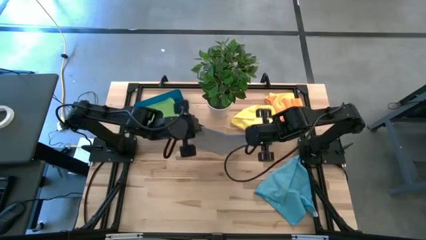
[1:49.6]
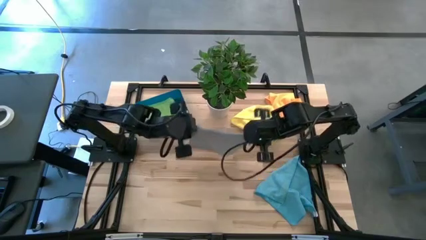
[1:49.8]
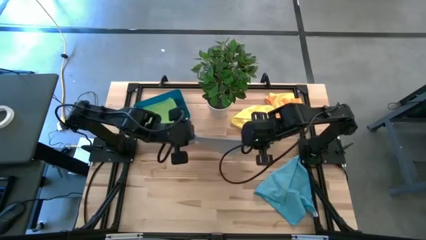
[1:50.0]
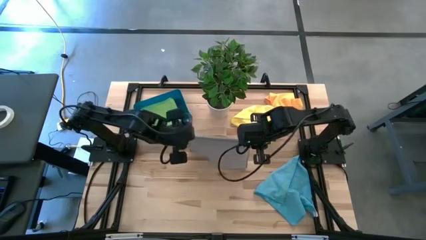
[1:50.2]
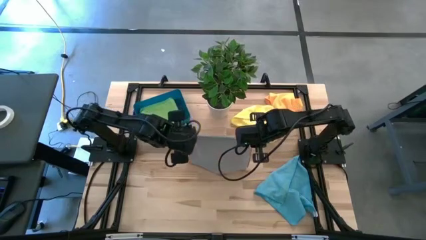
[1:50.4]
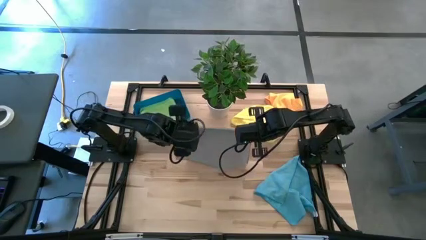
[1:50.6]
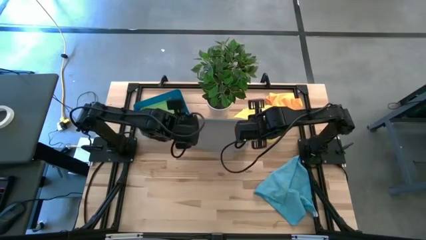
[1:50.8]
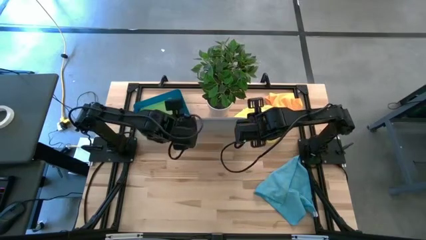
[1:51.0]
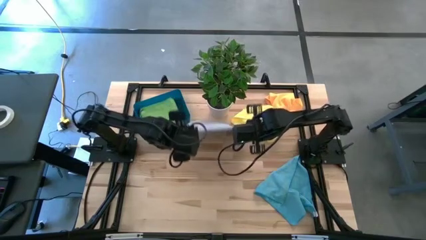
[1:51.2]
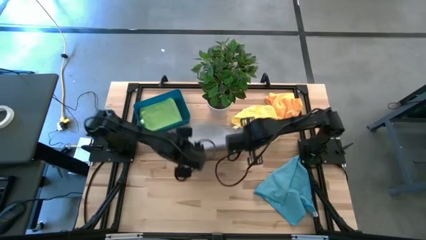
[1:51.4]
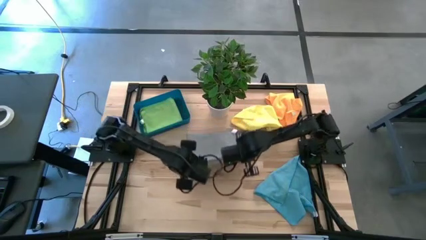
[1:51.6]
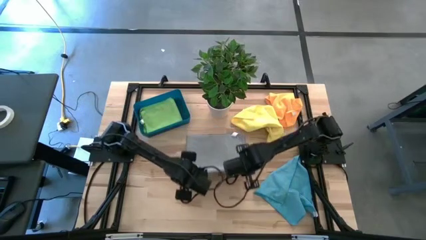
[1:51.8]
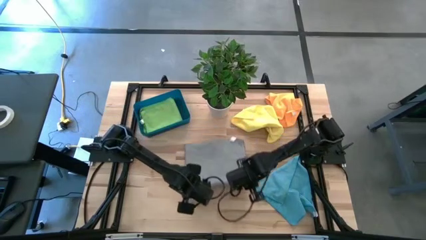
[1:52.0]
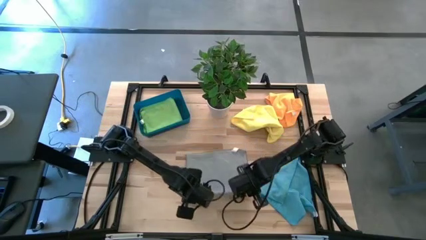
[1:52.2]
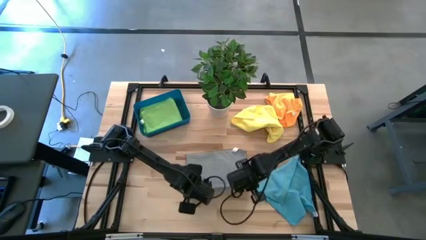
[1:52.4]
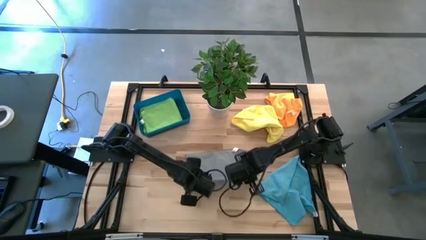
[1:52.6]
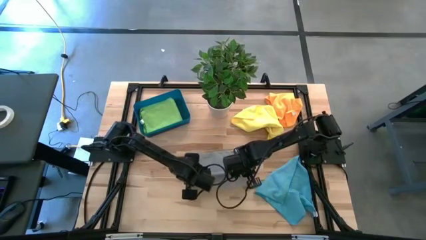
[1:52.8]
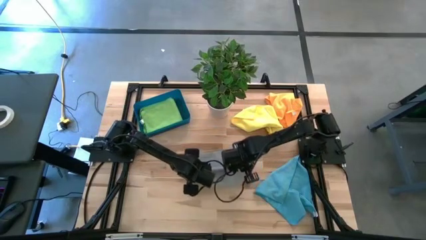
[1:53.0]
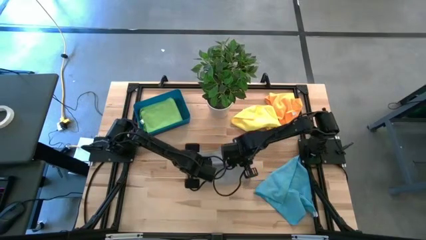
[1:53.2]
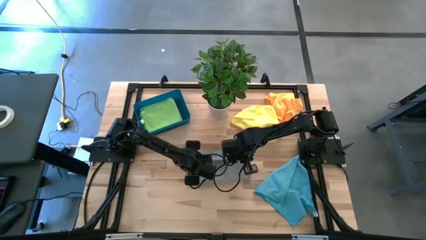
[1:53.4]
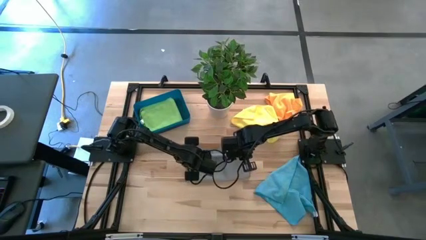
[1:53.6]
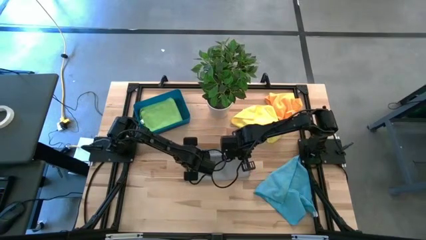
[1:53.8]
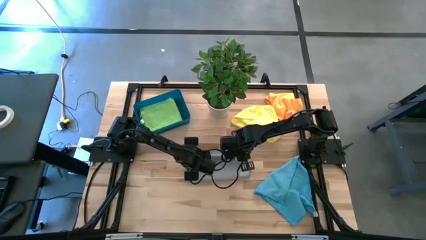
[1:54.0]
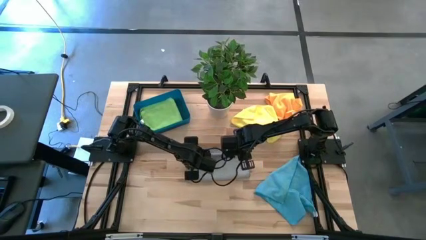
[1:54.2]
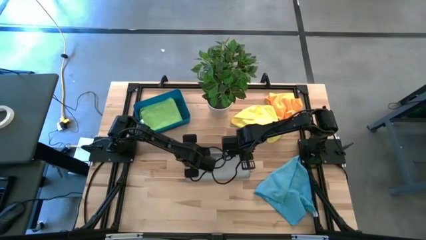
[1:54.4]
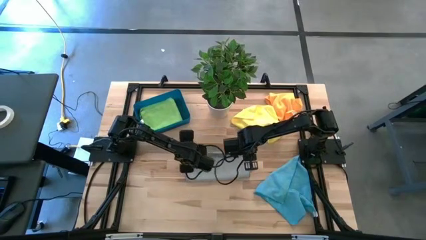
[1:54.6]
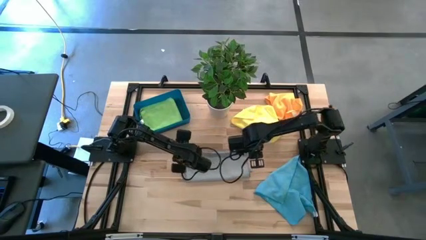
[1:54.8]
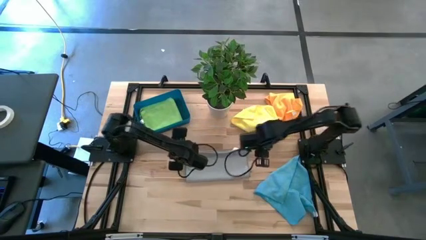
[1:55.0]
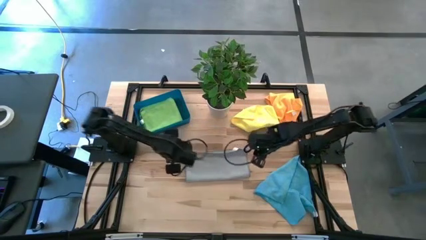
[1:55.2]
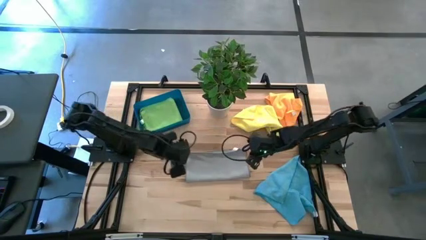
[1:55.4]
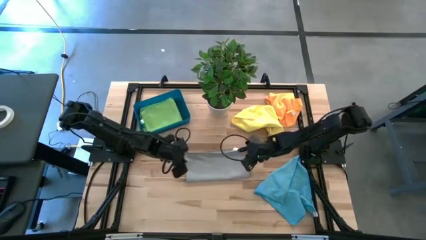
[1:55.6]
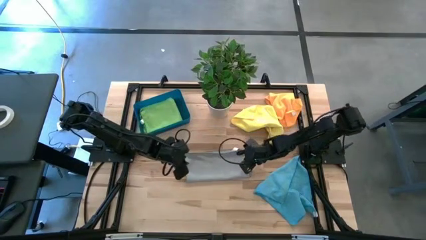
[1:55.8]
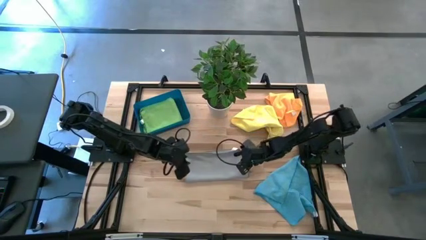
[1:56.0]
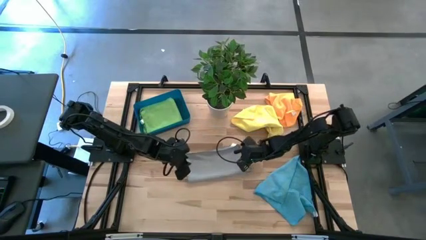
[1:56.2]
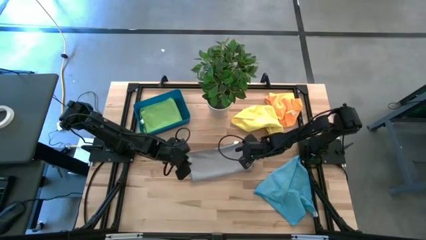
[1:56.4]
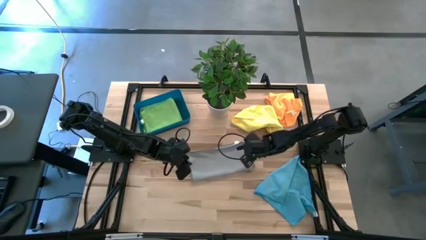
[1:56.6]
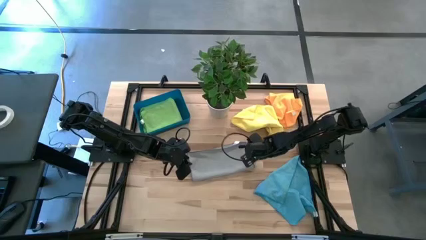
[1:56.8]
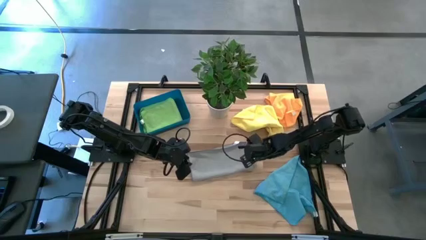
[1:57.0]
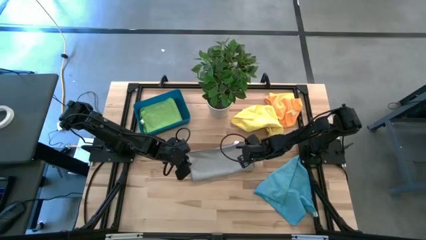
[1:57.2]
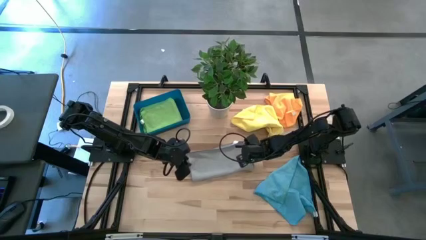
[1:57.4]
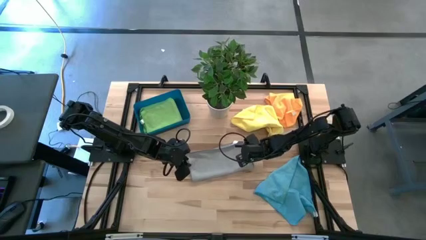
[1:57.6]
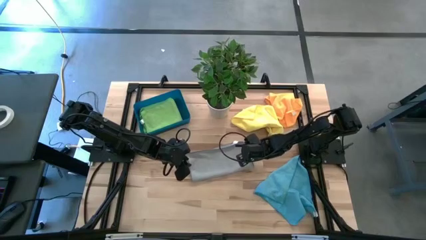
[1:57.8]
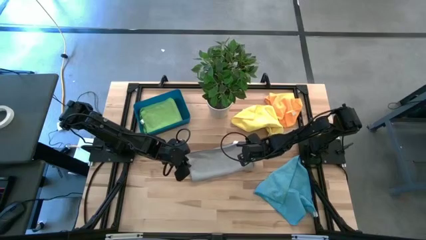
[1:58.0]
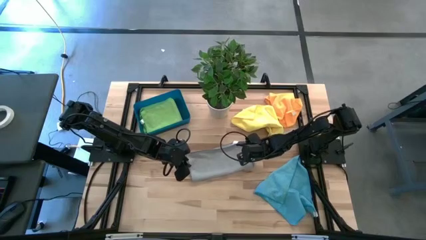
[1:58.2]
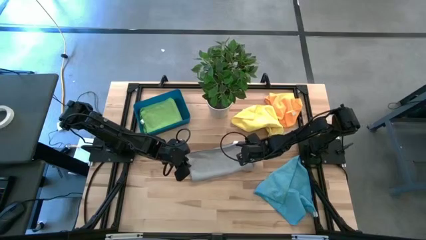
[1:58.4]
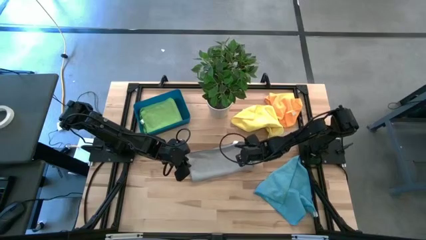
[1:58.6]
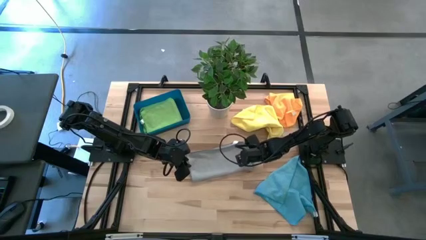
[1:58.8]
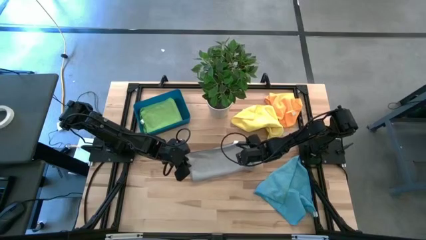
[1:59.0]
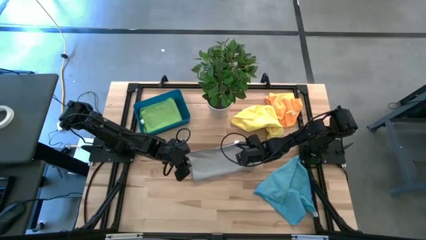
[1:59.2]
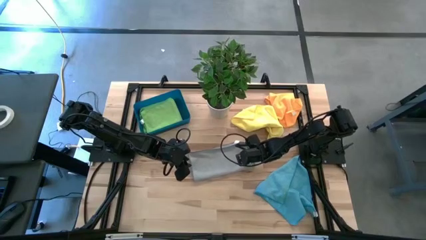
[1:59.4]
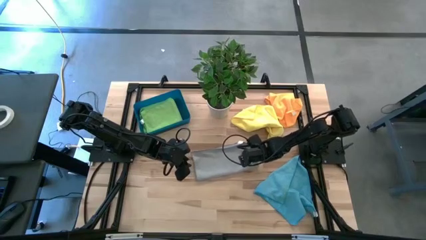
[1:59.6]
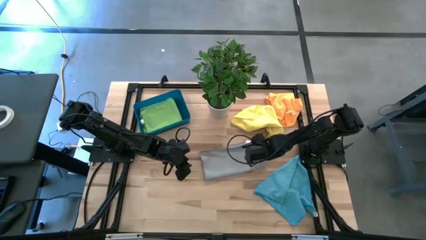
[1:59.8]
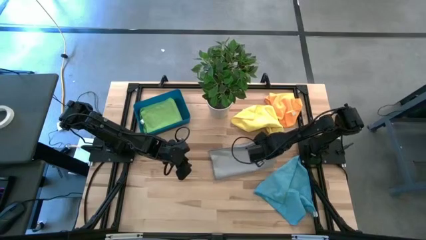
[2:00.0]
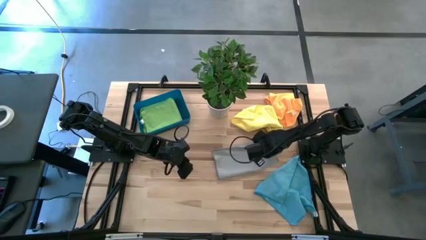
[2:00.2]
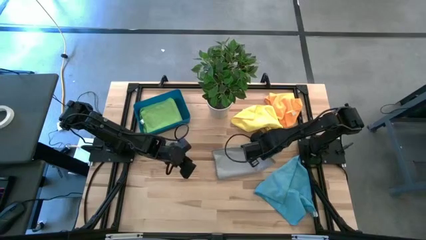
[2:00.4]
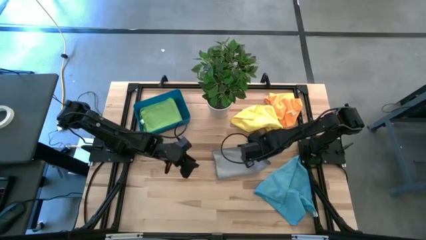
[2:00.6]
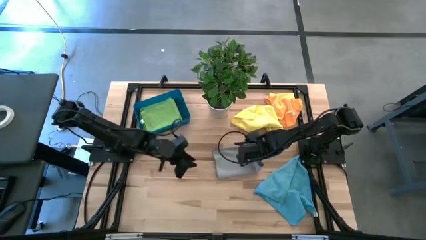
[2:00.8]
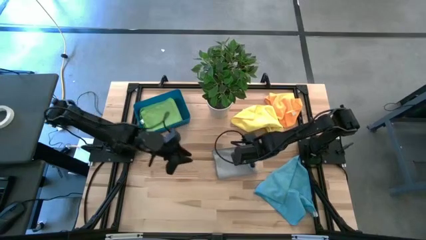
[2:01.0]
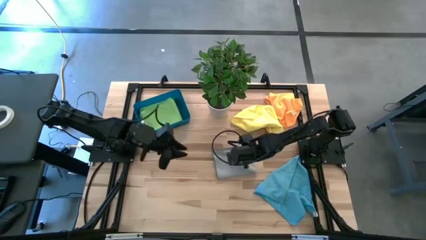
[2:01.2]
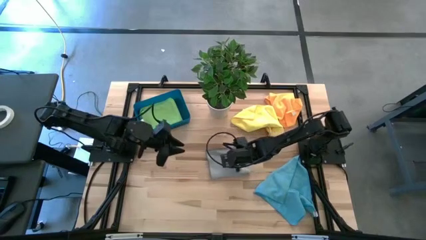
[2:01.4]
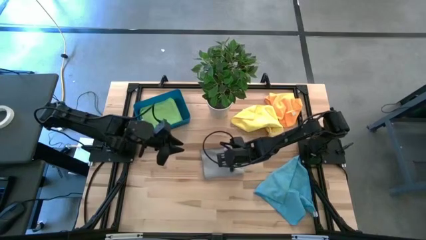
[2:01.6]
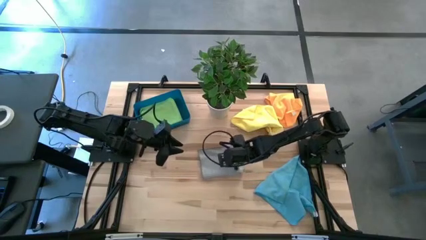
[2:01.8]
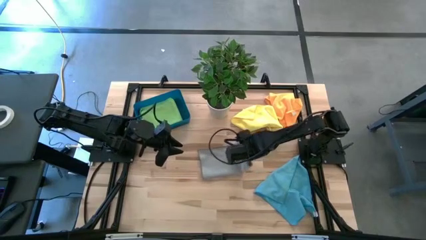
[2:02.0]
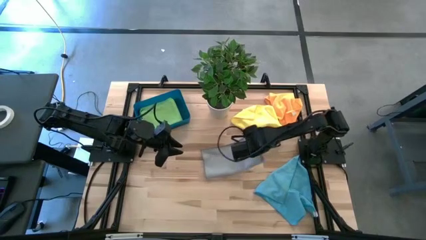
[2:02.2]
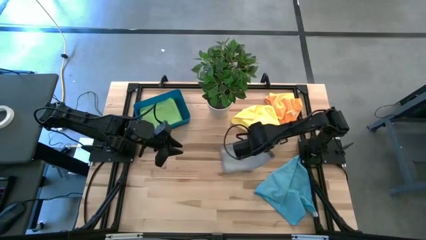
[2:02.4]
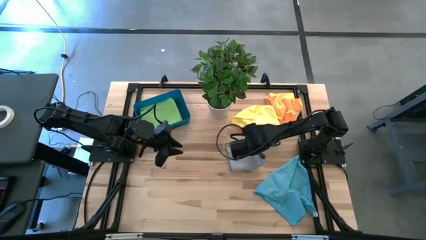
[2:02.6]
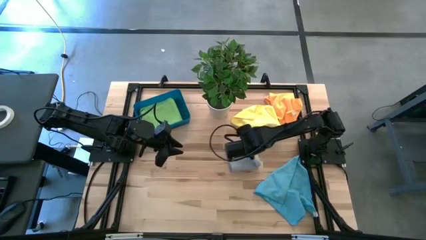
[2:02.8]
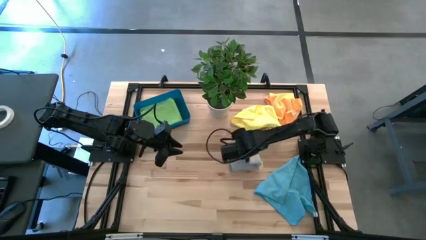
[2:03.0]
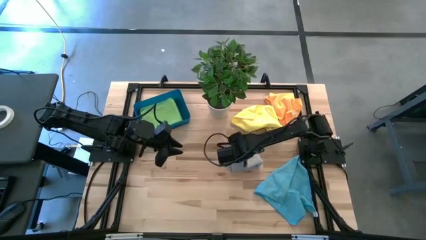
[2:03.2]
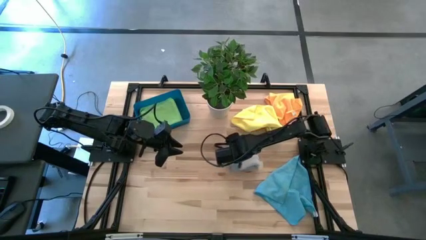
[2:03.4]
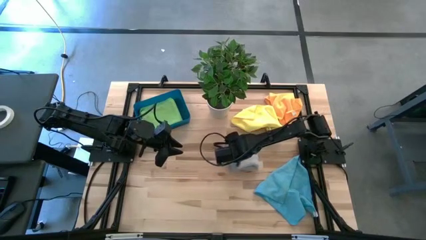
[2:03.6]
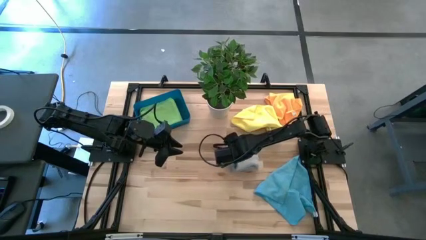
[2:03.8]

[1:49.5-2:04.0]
Task: Fold microfiber towels
Fold the gray towel
